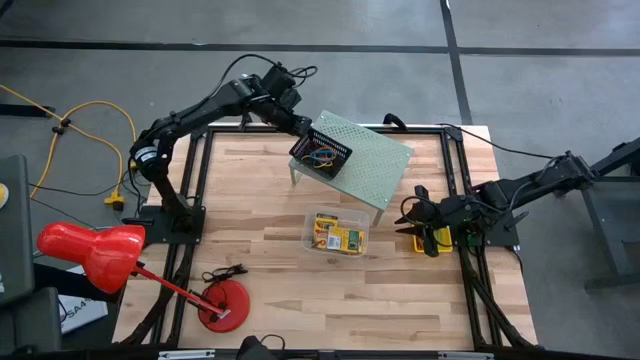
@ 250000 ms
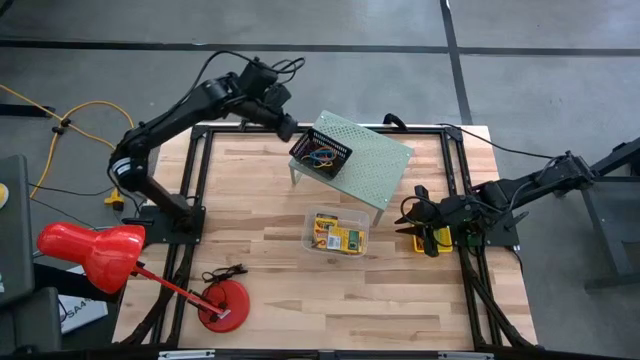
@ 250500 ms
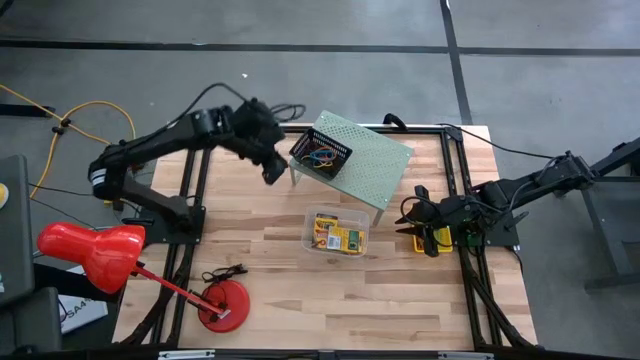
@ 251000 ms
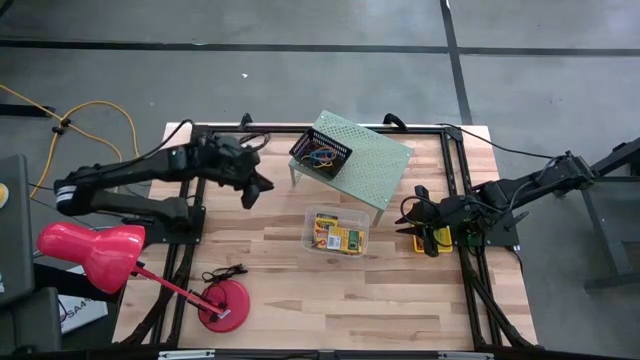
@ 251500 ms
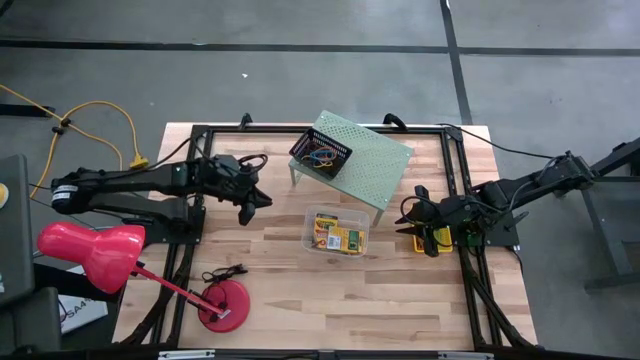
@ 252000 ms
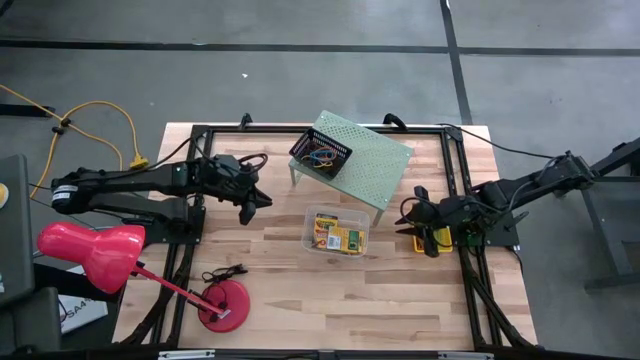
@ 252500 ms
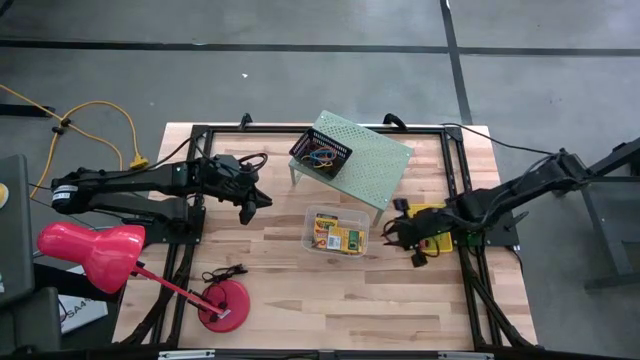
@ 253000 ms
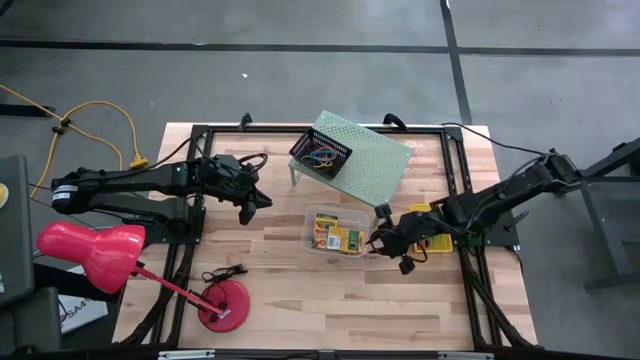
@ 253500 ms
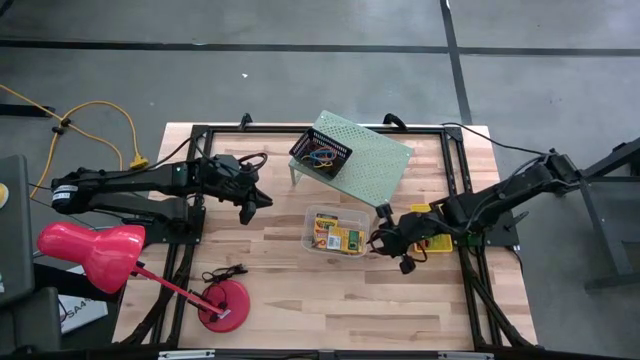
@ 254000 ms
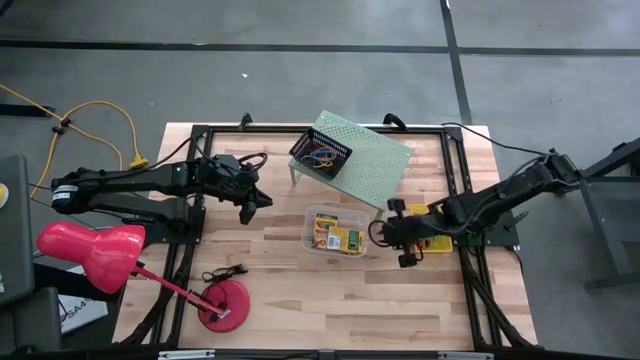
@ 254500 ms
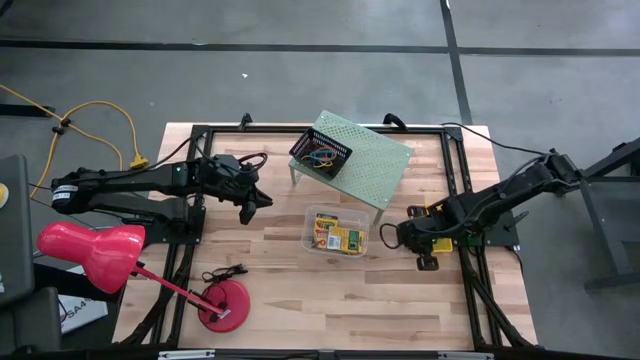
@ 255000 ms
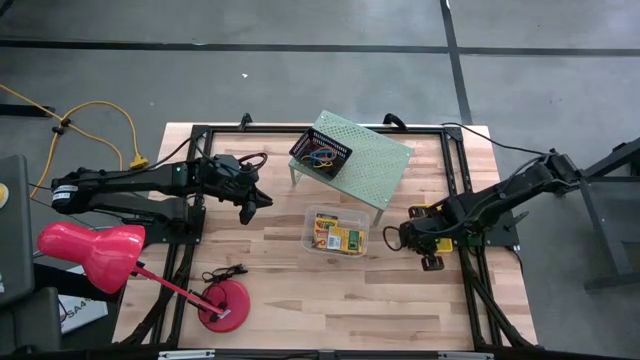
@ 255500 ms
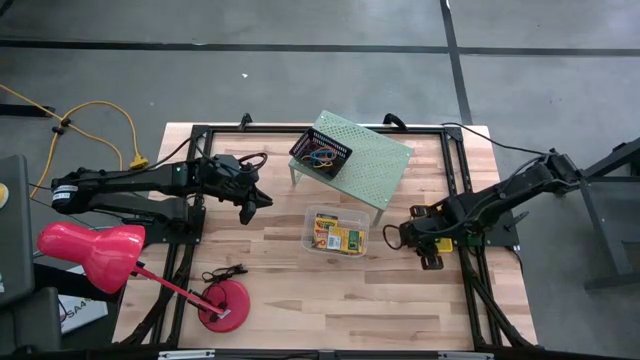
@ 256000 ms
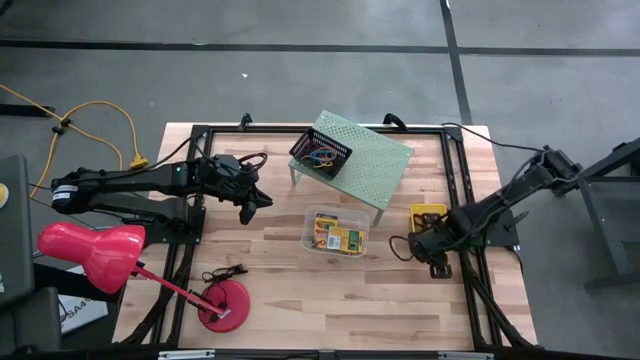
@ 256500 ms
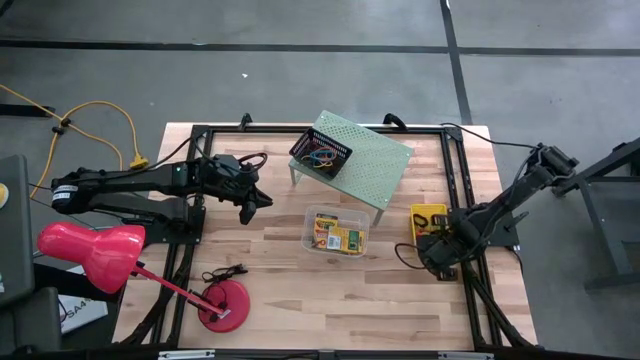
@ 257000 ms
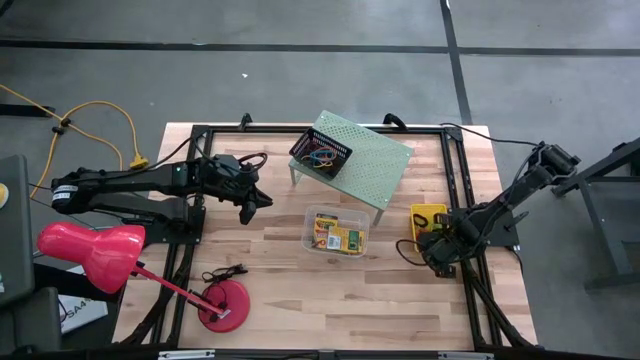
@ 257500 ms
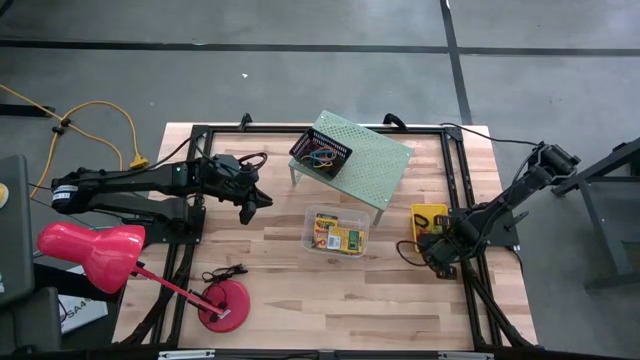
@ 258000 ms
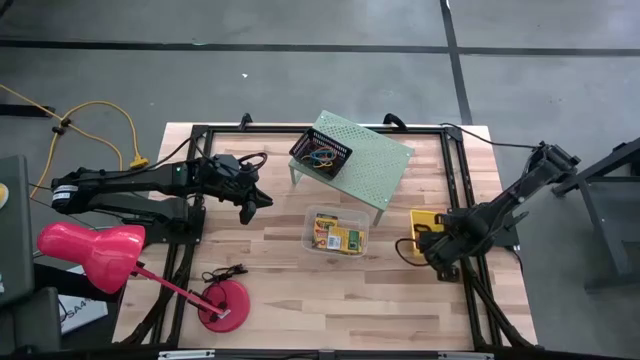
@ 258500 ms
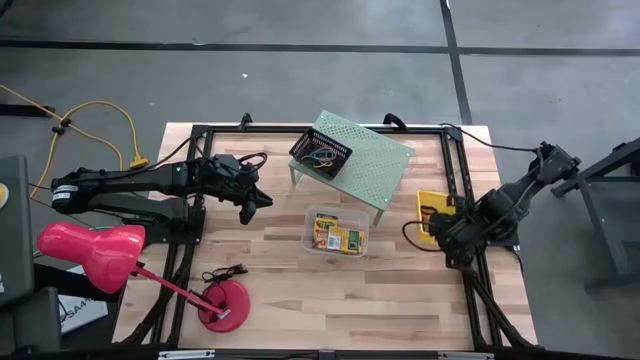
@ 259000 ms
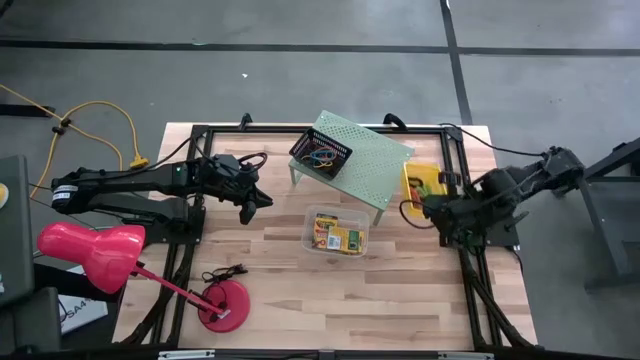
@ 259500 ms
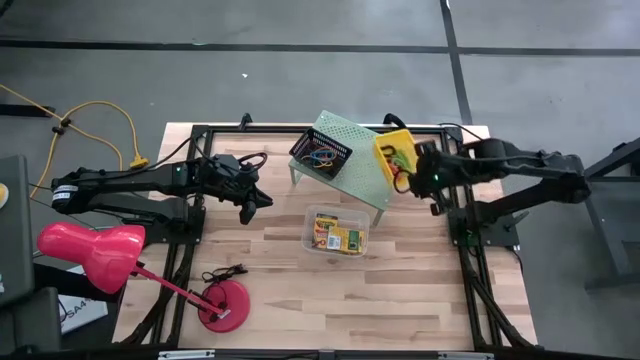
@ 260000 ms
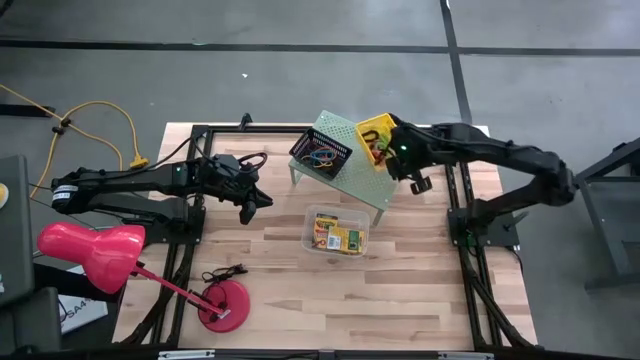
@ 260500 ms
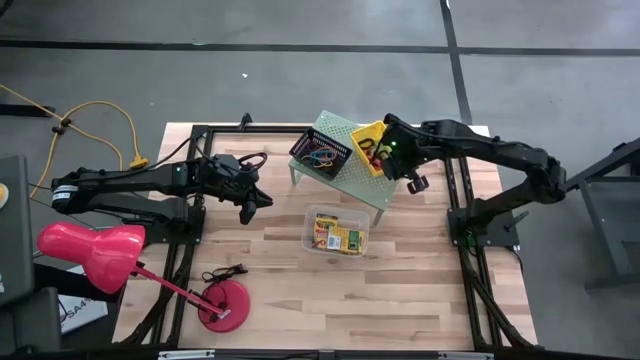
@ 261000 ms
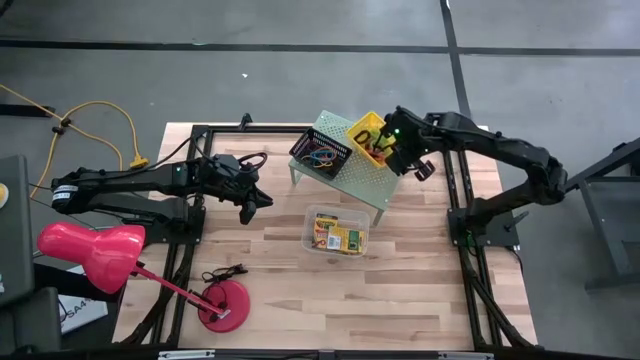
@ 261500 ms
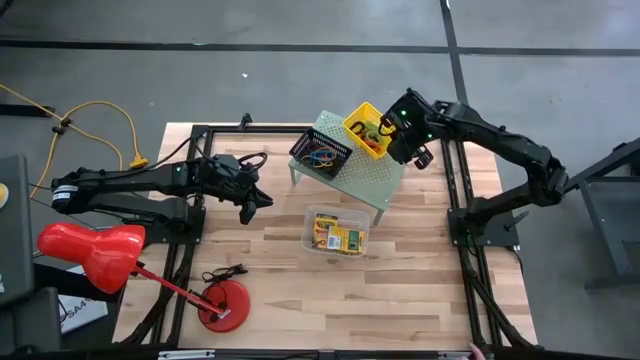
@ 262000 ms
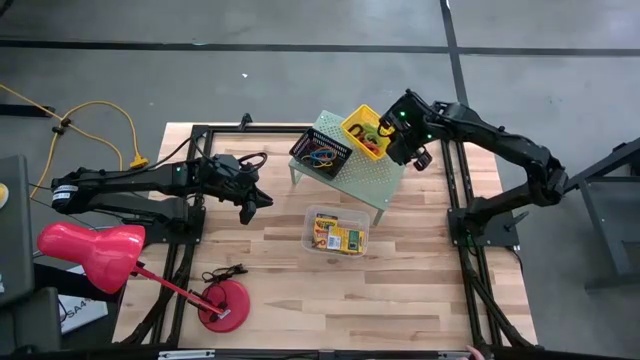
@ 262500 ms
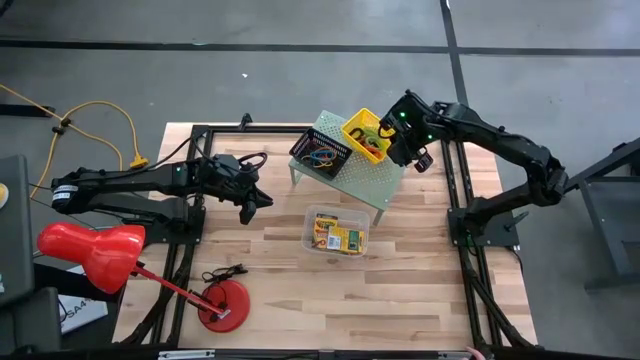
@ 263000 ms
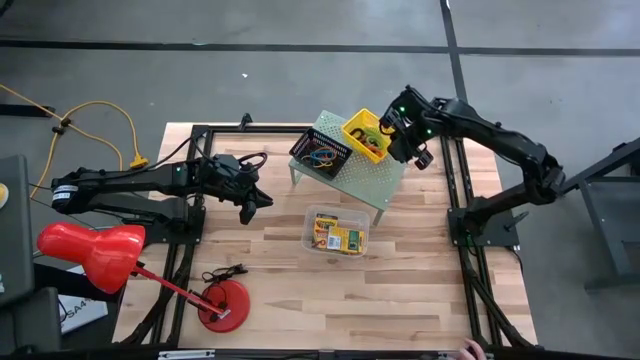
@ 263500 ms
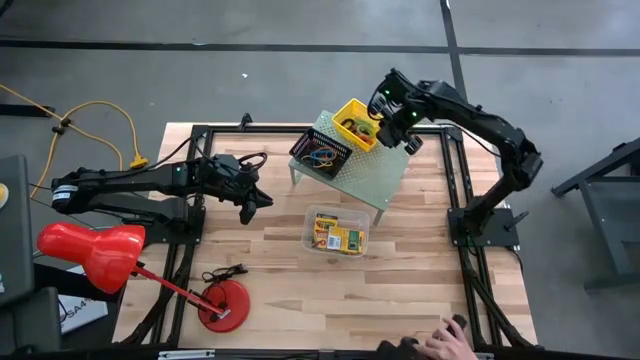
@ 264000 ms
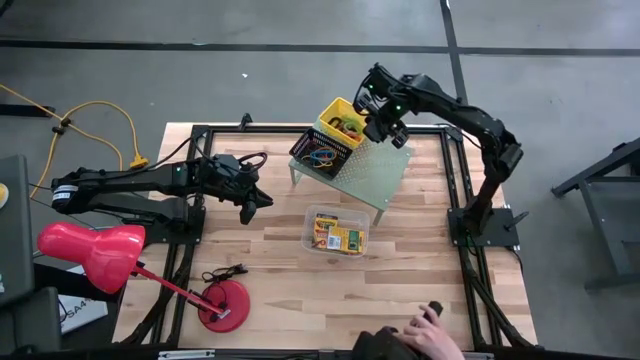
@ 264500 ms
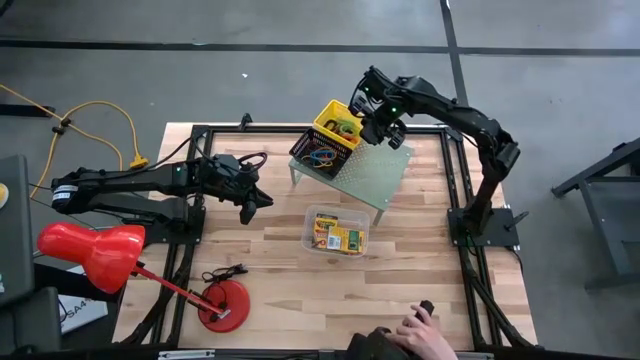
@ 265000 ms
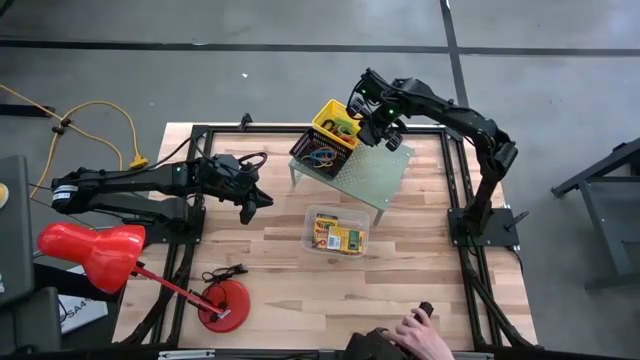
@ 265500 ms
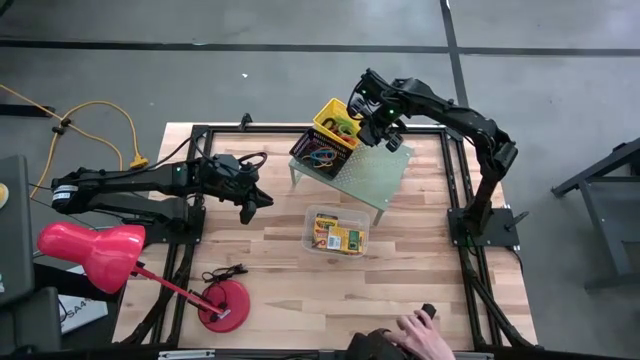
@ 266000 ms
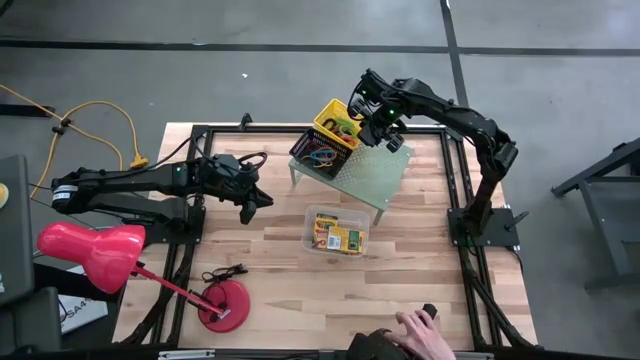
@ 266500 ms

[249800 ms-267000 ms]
Task: Pick & Place Office Desk Supplies
Put the yellow bin with spring keychains on the shelf

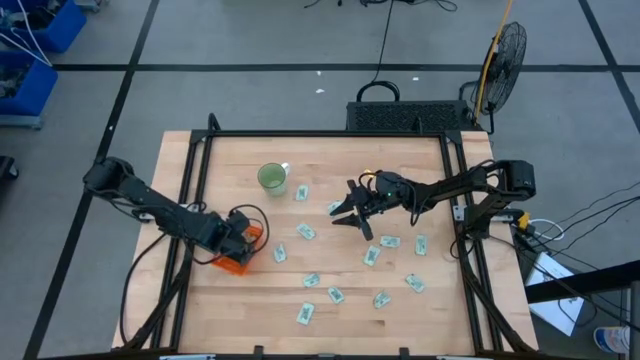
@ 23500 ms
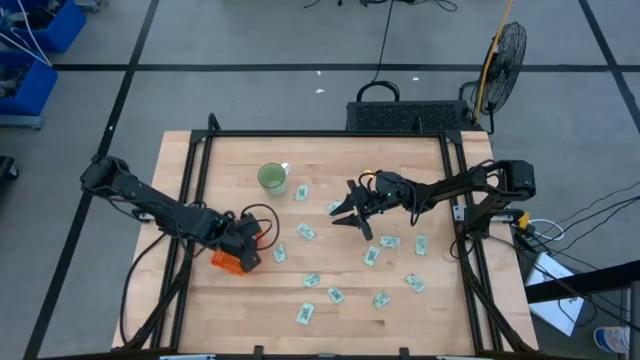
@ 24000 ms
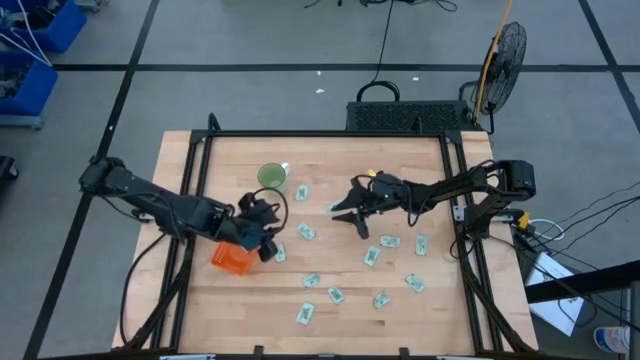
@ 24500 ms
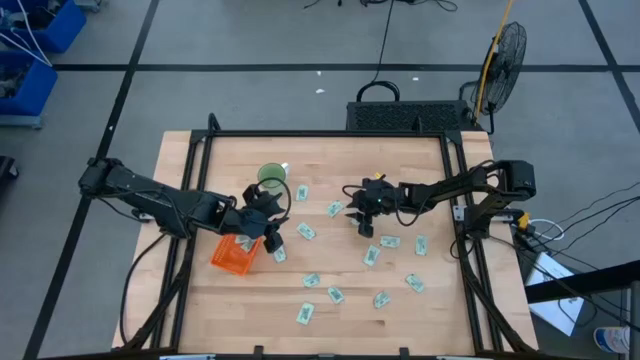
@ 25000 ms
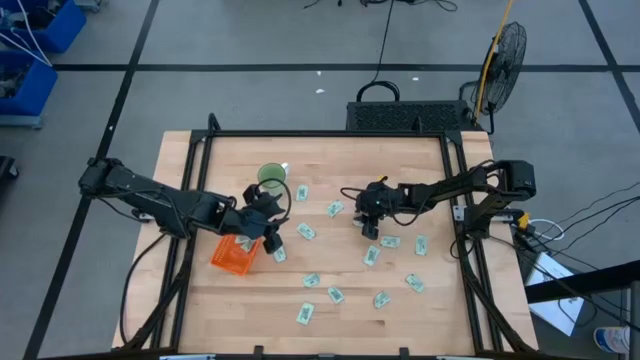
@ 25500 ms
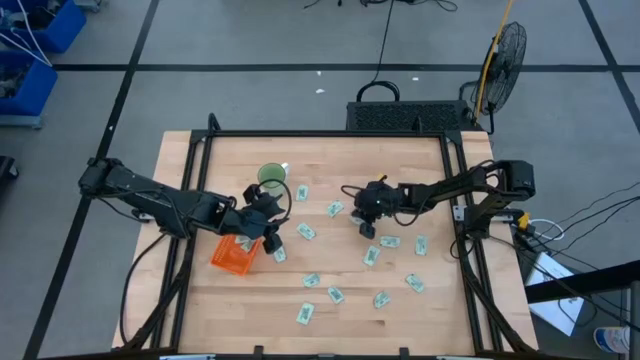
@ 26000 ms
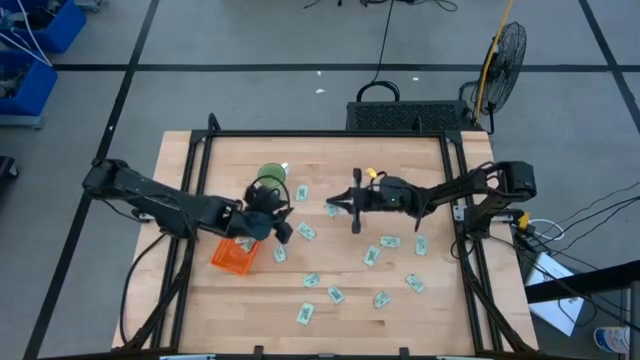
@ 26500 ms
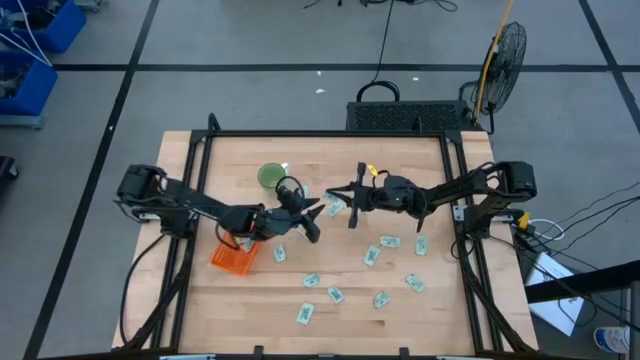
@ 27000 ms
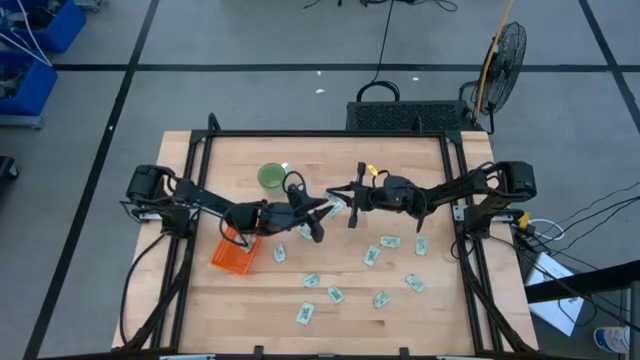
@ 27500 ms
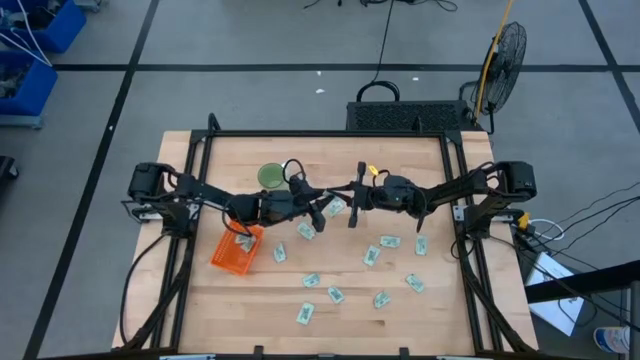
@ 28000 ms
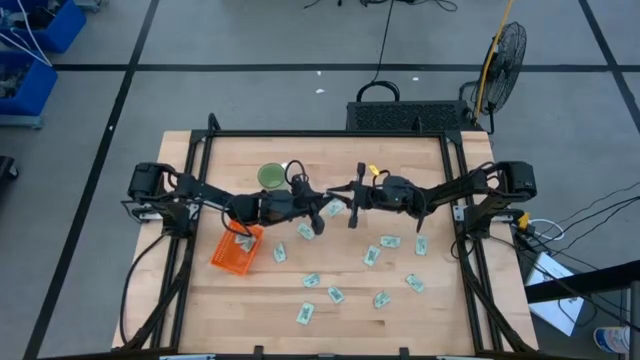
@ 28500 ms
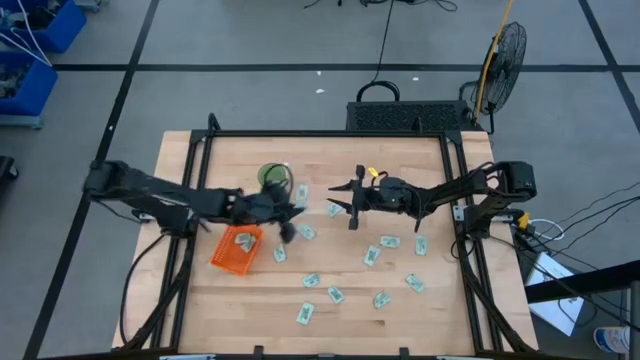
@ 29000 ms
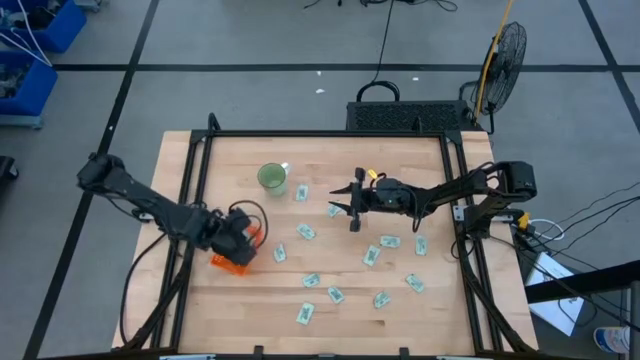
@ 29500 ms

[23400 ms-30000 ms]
Task: Pick and place Stevia / Truvia into bins
Put the stevia packet into the orange bin
